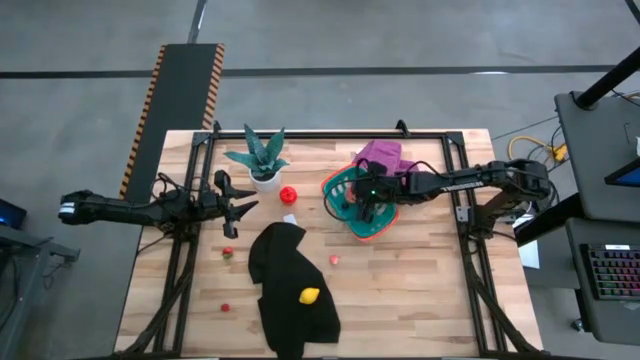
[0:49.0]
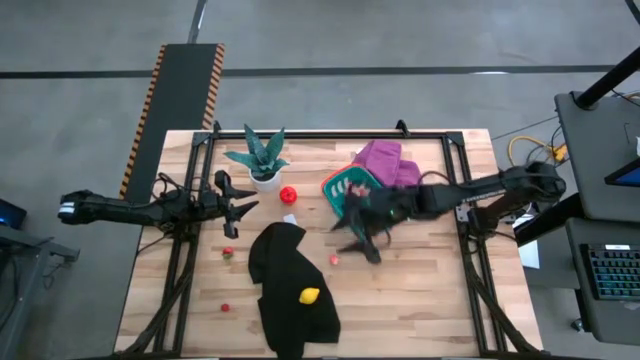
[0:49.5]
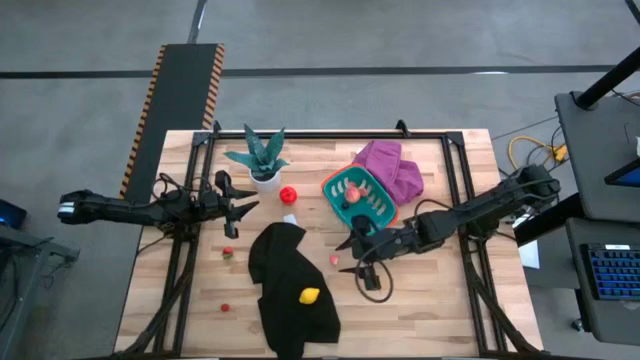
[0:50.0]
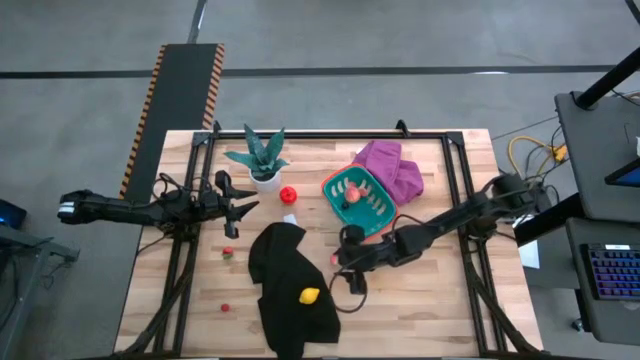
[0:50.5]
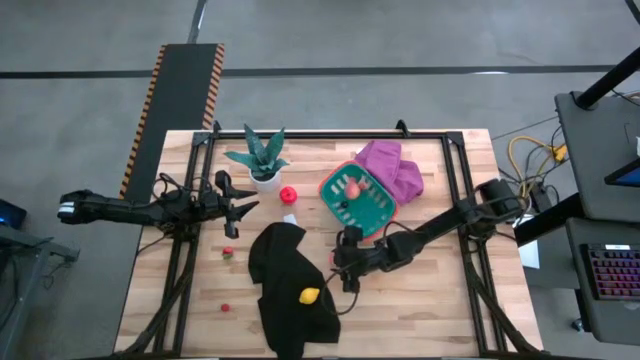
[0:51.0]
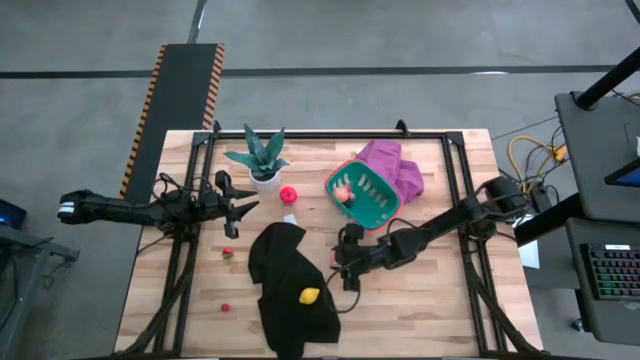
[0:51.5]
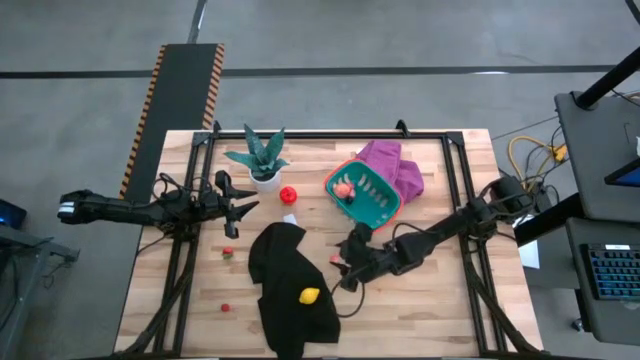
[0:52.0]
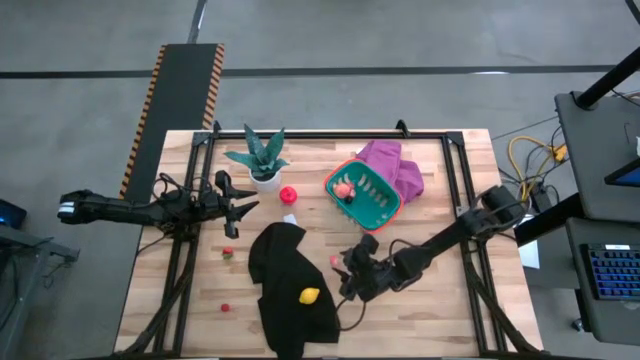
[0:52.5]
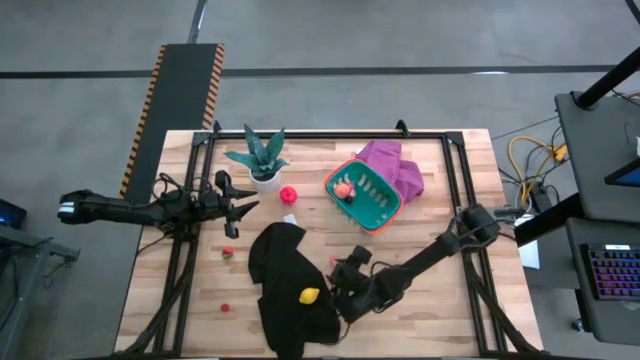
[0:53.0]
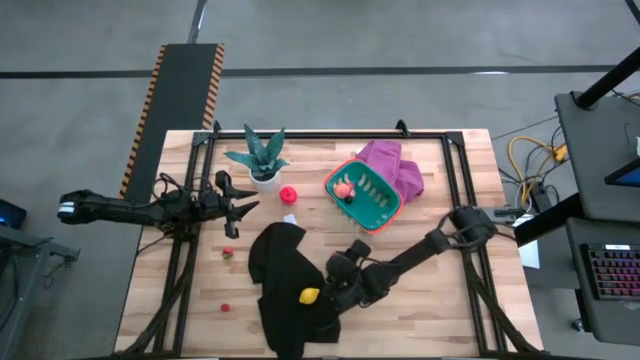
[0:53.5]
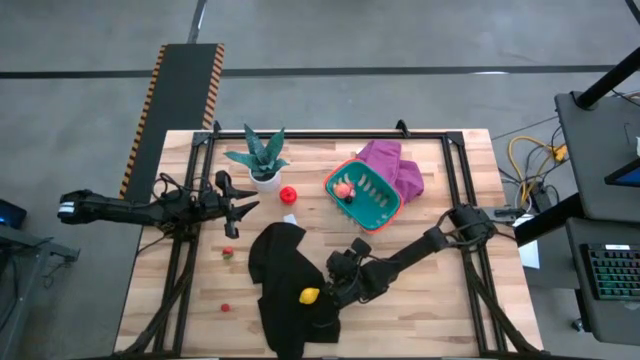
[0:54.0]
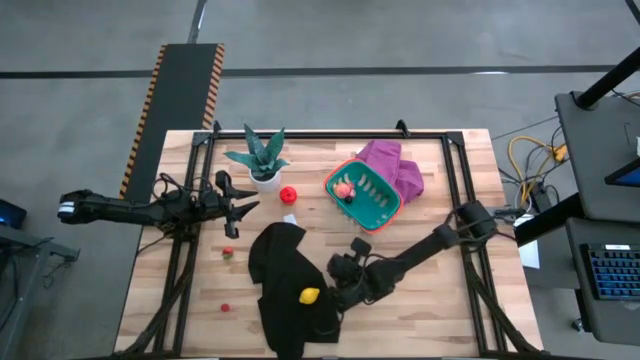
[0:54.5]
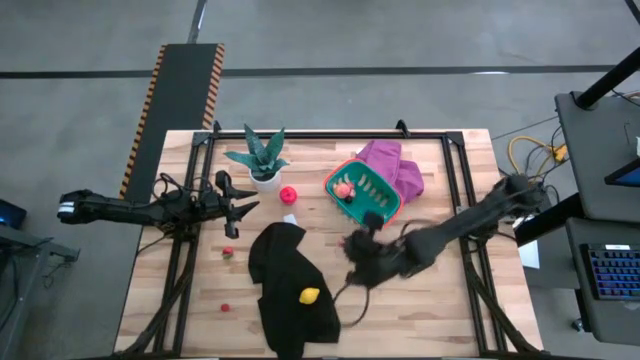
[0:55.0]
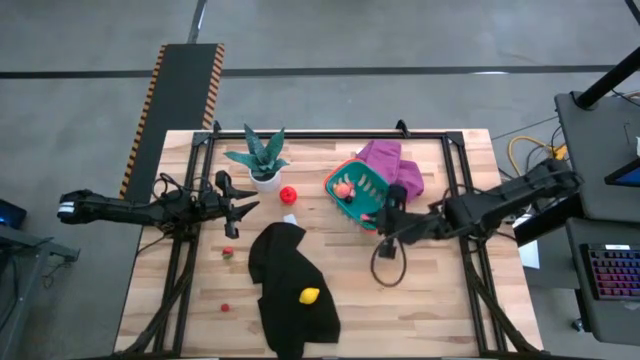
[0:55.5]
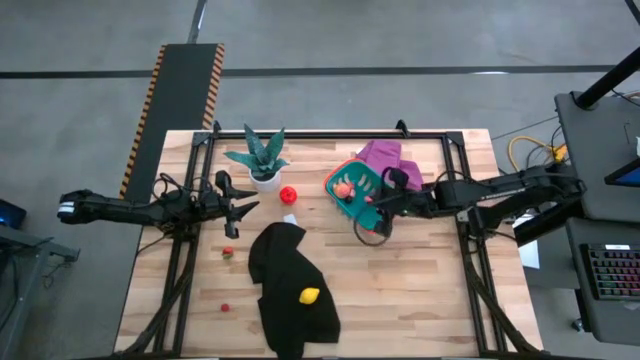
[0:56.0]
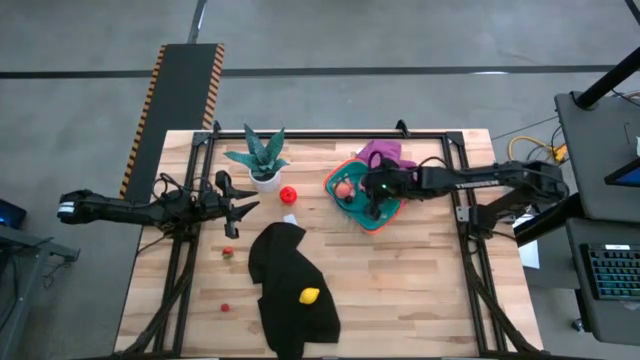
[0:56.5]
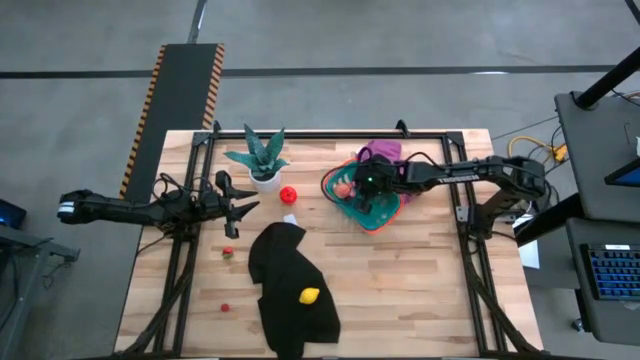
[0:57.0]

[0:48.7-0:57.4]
Task: Pick and placing Produce into tupperware
Put the apricot into the green basket

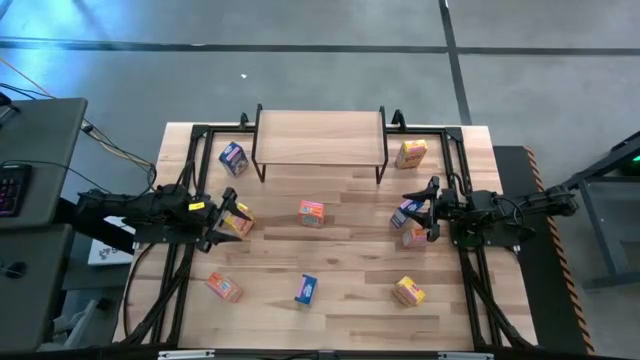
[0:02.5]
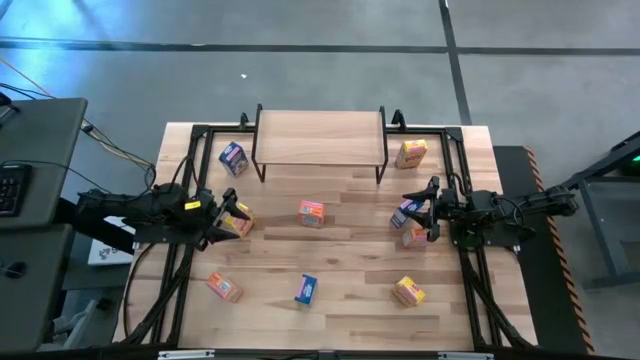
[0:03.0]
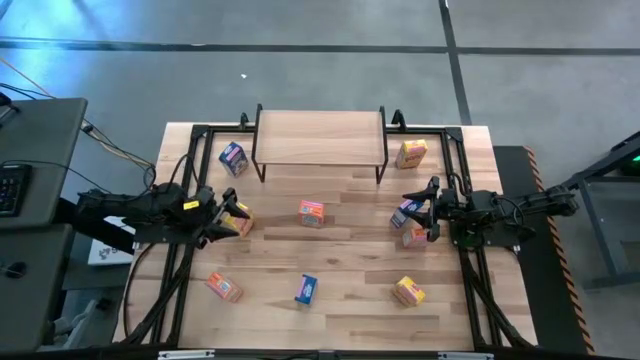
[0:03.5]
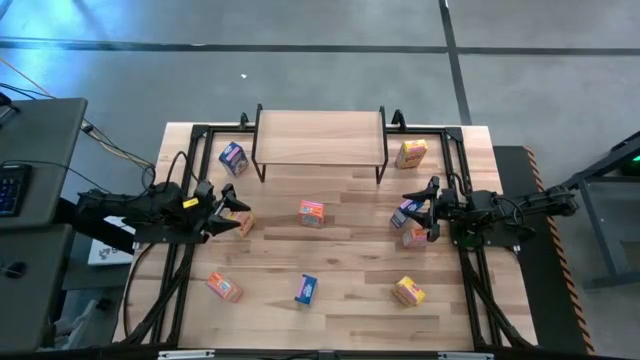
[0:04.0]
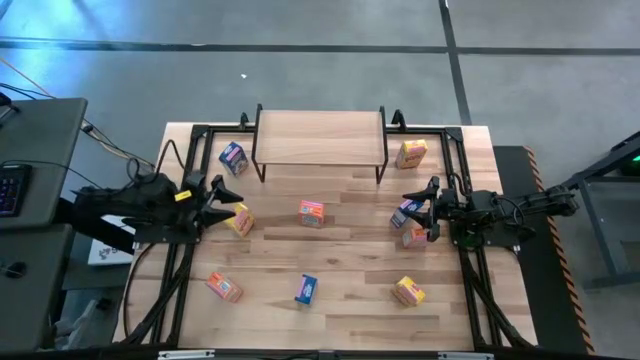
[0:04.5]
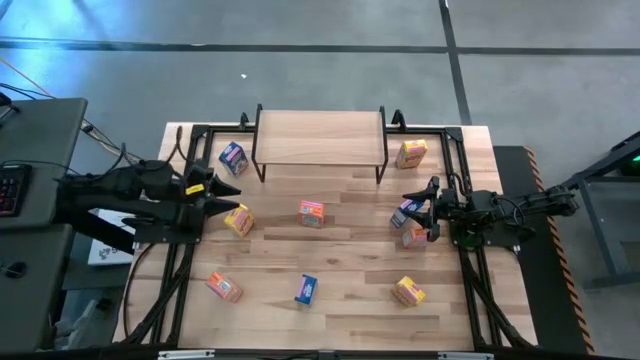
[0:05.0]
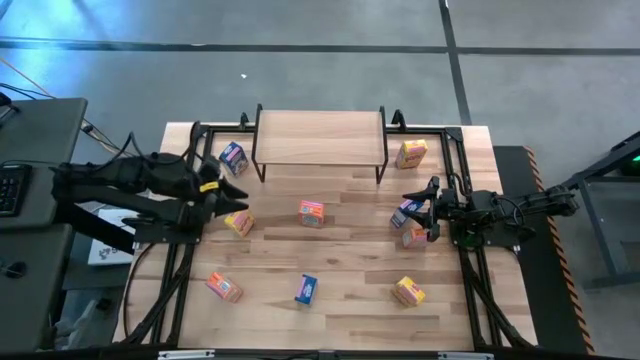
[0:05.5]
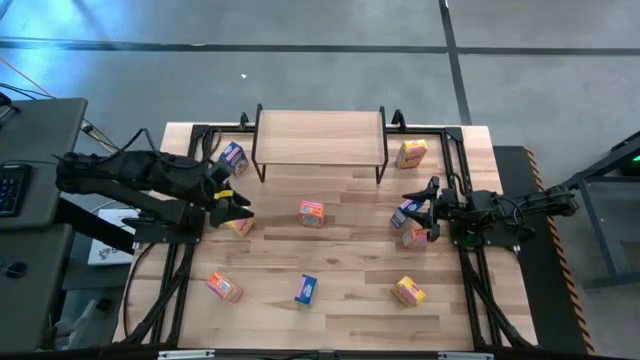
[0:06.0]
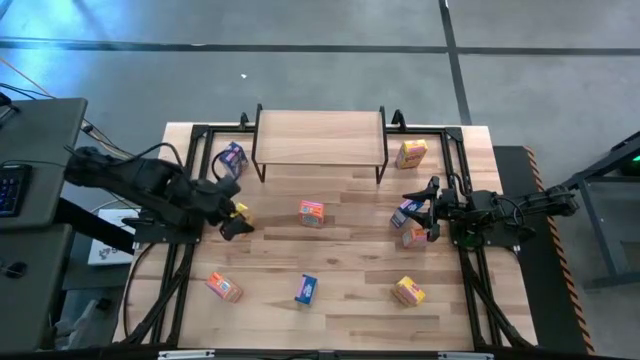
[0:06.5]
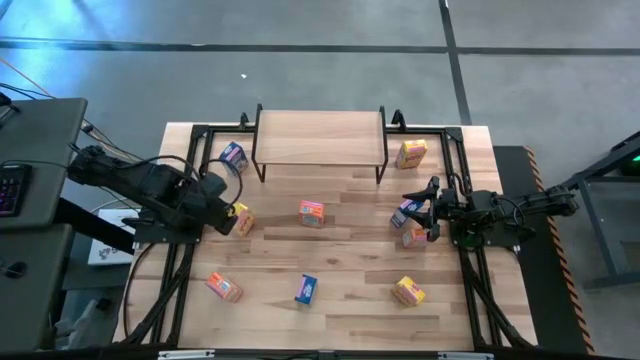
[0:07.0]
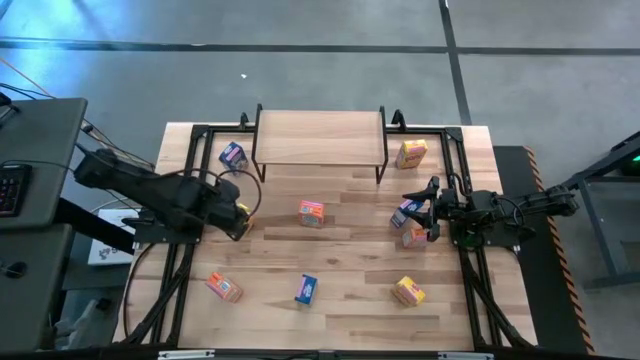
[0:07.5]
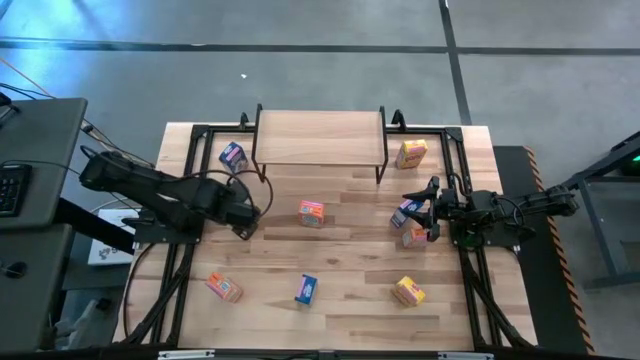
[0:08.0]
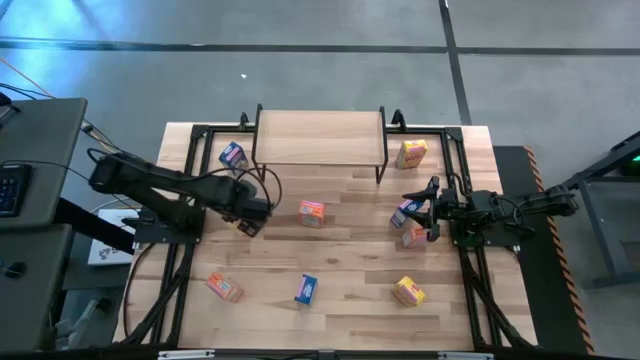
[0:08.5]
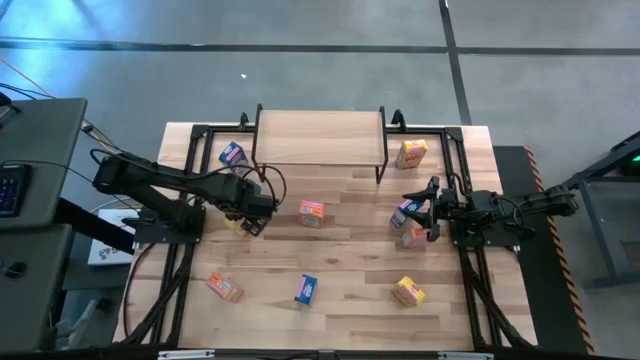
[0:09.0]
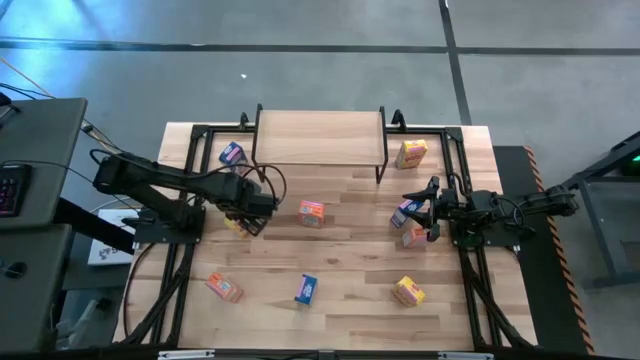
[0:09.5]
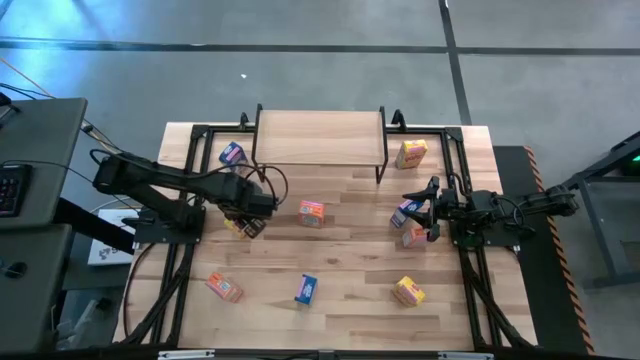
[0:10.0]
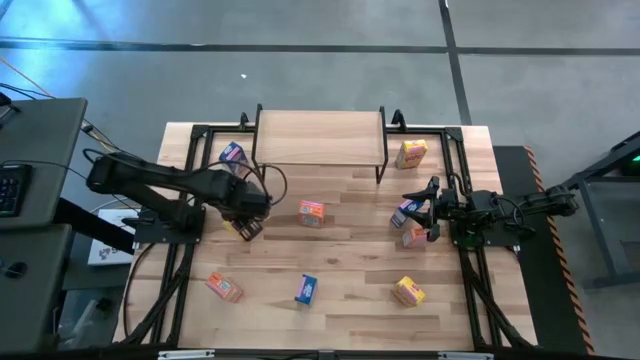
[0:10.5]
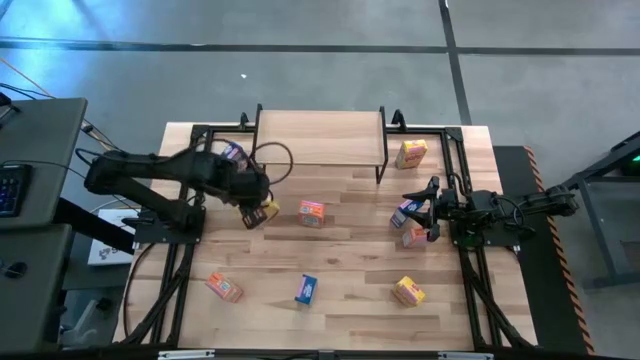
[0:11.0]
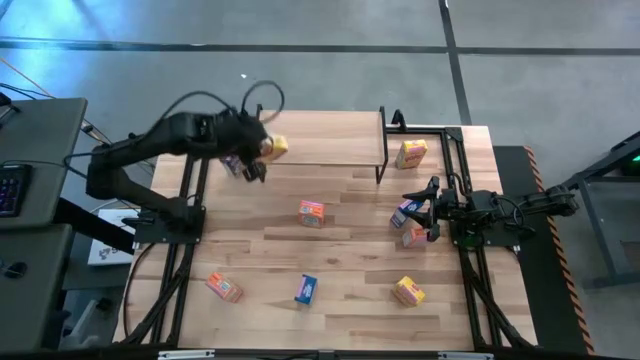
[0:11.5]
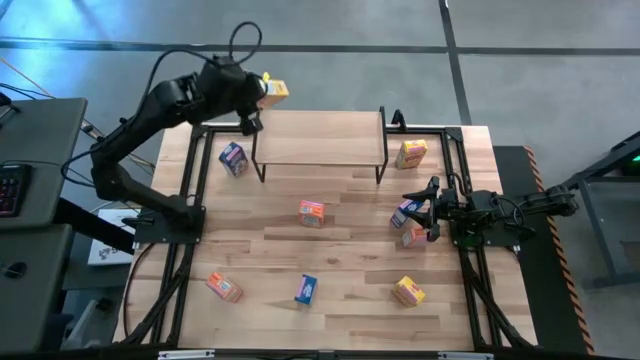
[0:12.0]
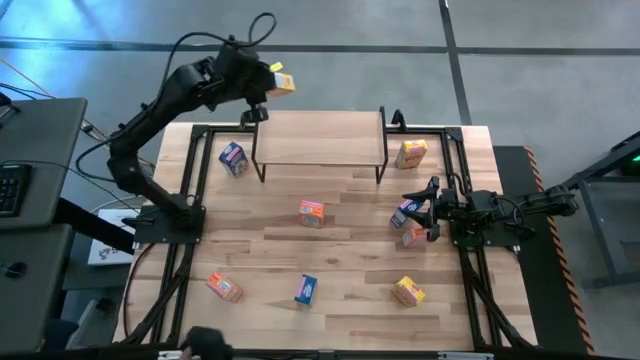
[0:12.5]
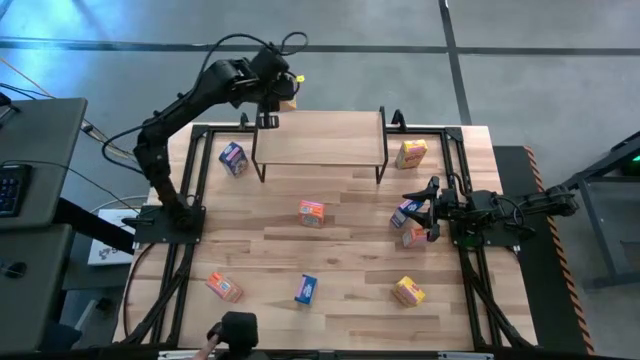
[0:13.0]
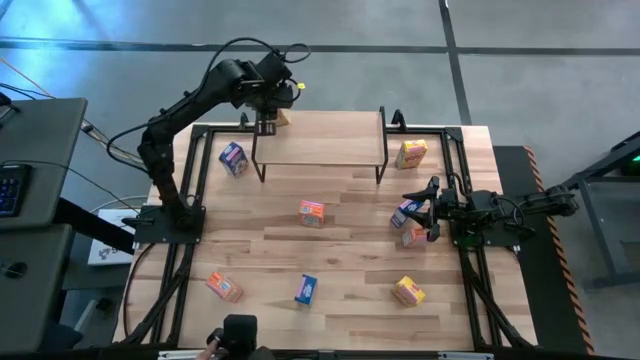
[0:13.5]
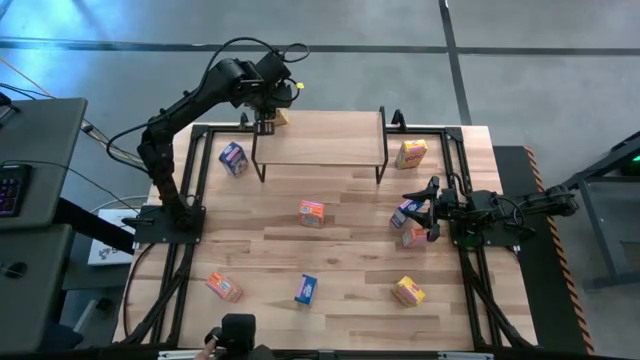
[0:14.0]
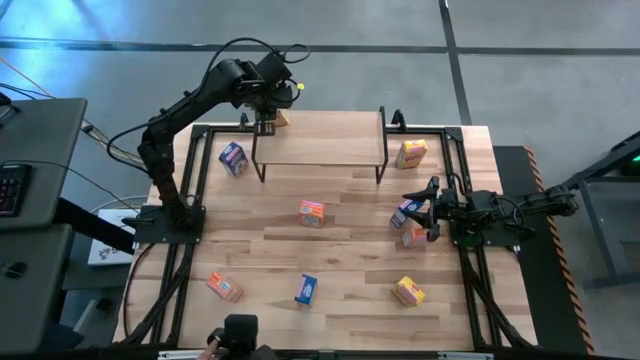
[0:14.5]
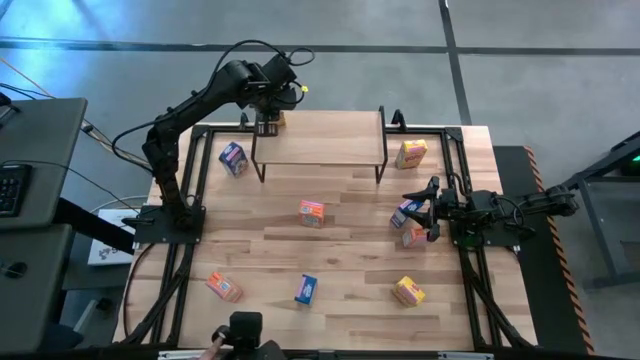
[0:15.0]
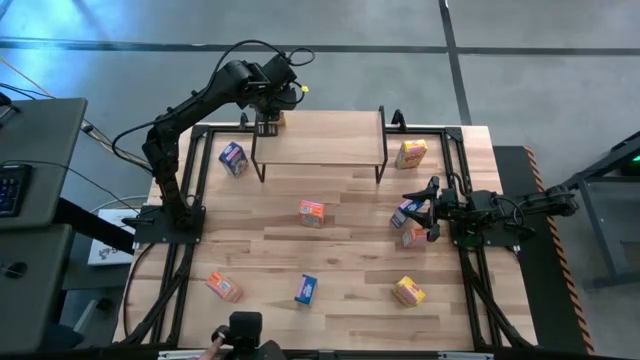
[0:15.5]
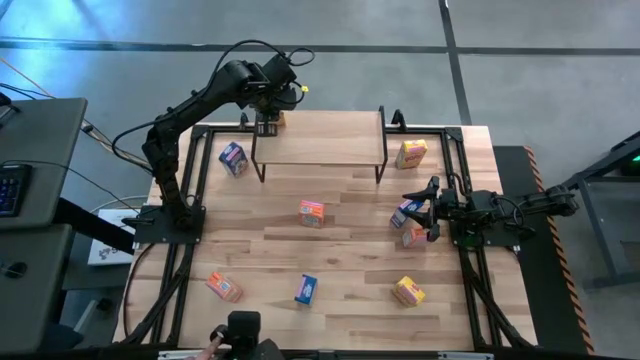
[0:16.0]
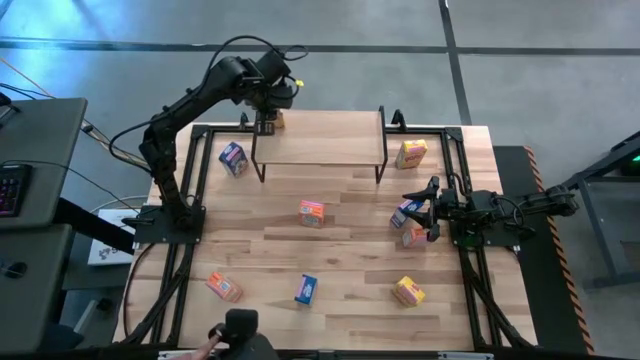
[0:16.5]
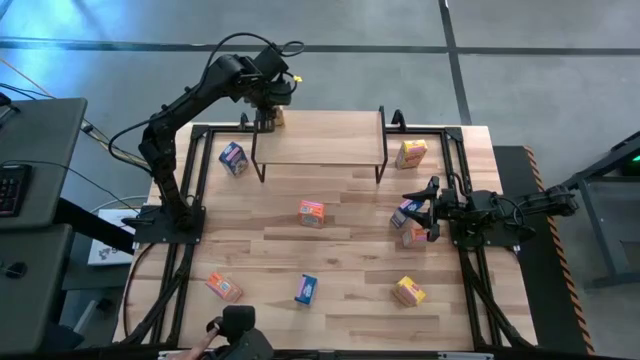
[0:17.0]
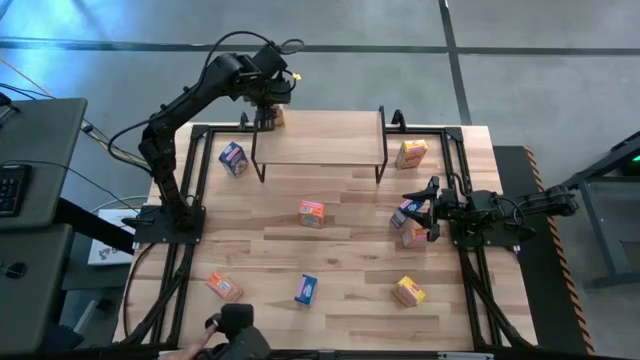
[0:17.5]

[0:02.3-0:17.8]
Task: Stack cereal on shelf
Put the middle left yellow cereal box on the shelf
